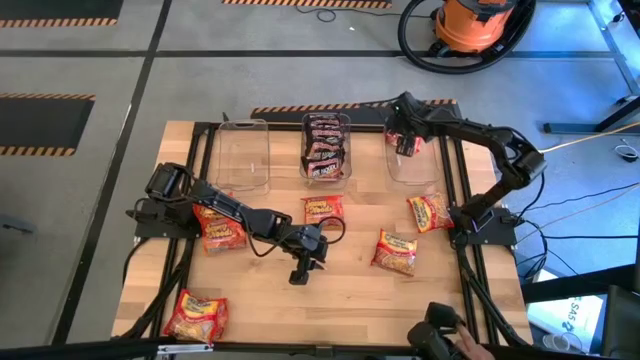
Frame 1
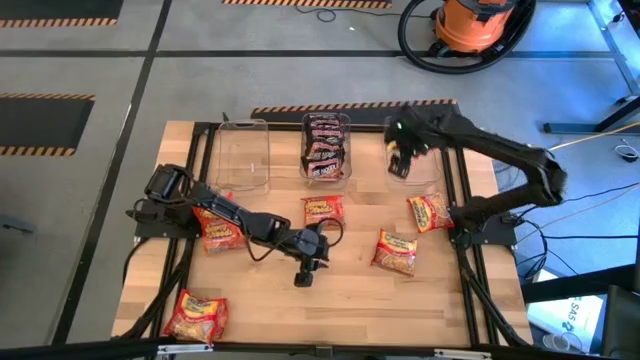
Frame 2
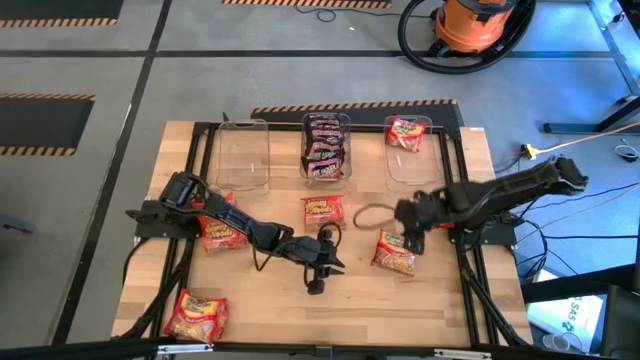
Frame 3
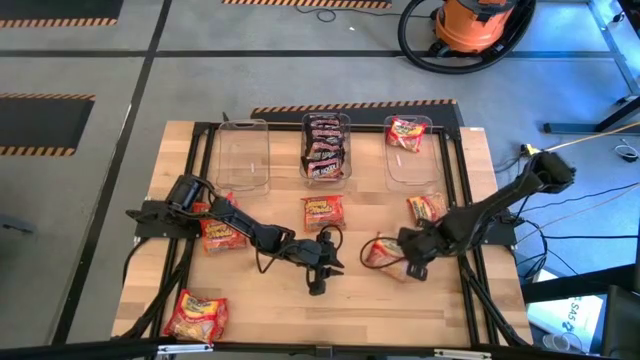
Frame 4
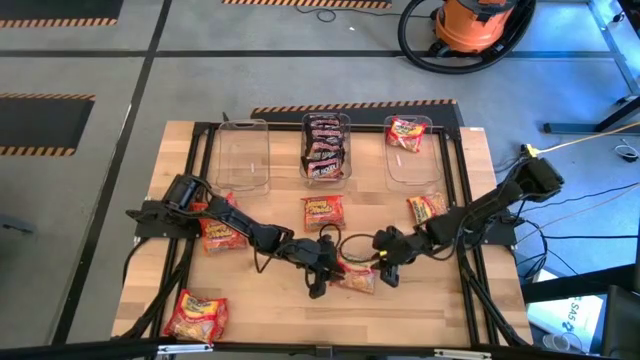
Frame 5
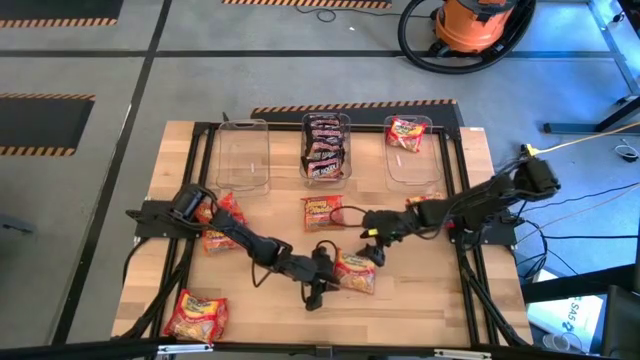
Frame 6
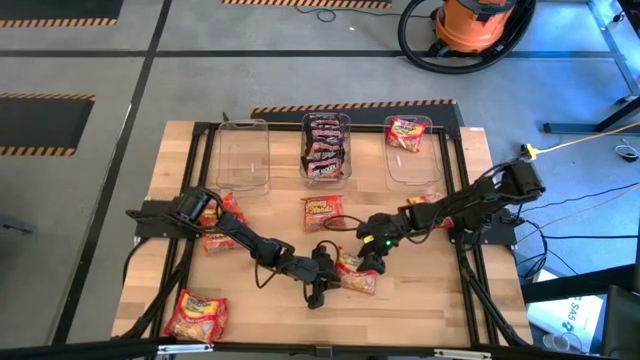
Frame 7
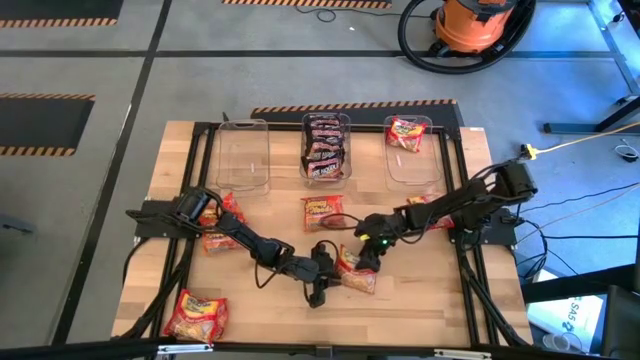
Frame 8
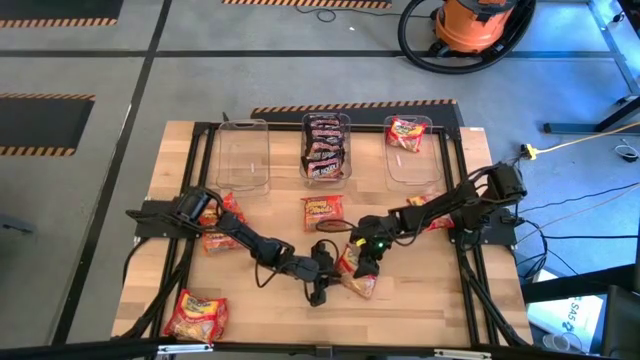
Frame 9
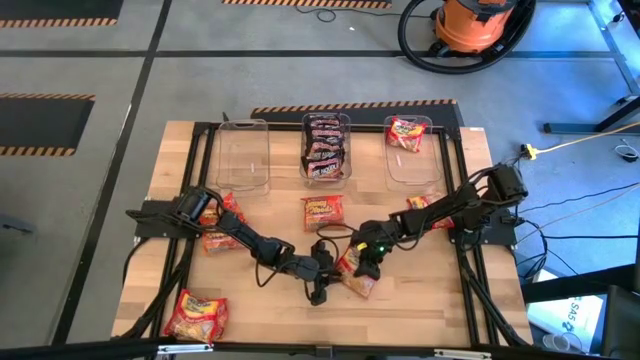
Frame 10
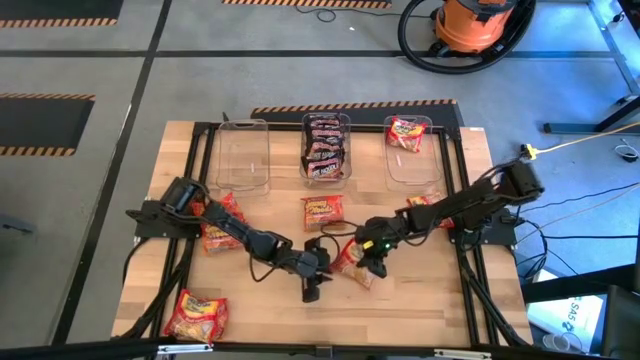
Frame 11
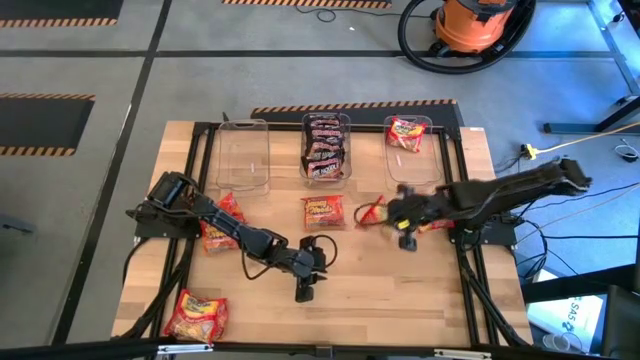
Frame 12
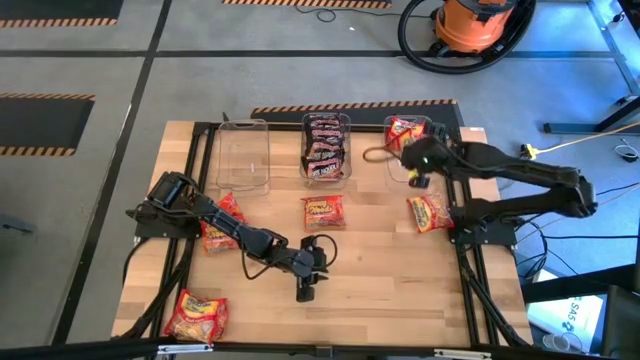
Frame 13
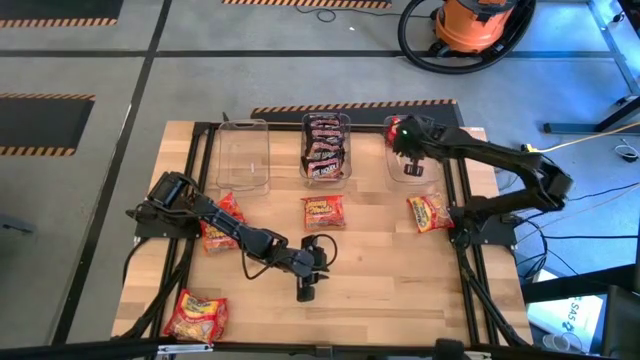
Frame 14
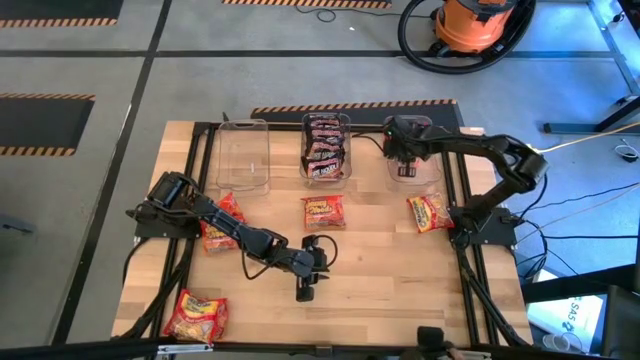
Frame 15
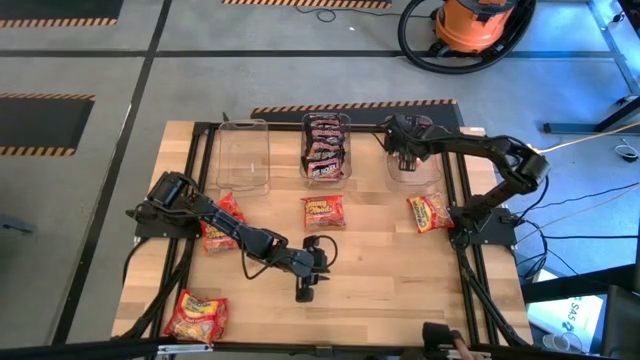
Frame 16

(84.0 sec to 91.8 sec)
Task: Sort Maruchan noodles
Put the middle red noodle pack into the right transparent bin

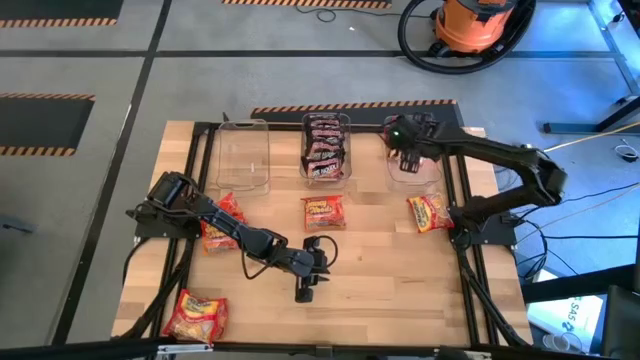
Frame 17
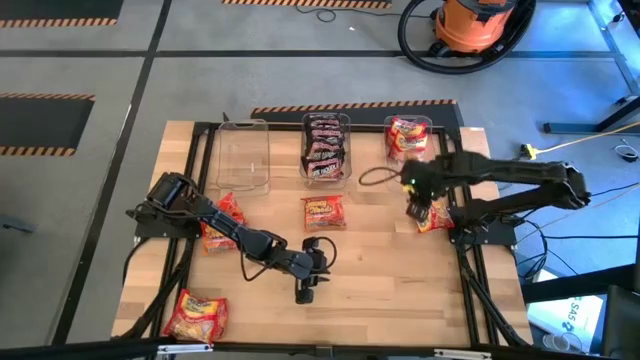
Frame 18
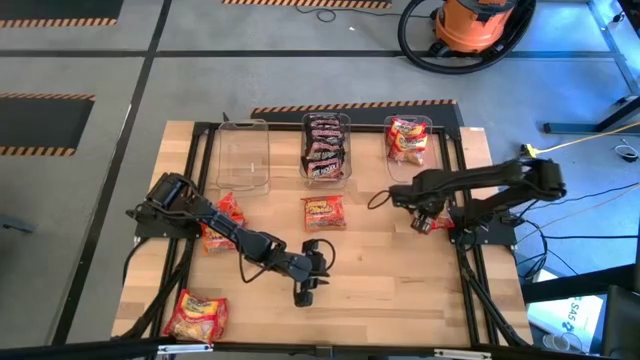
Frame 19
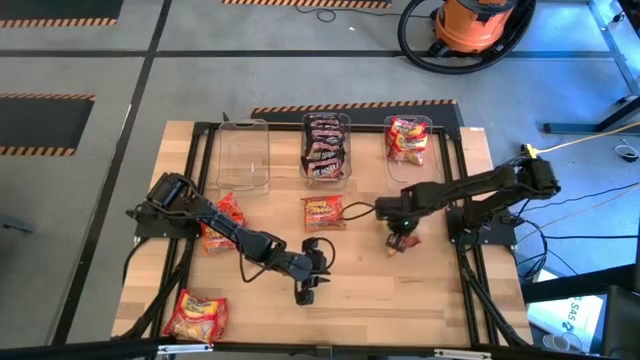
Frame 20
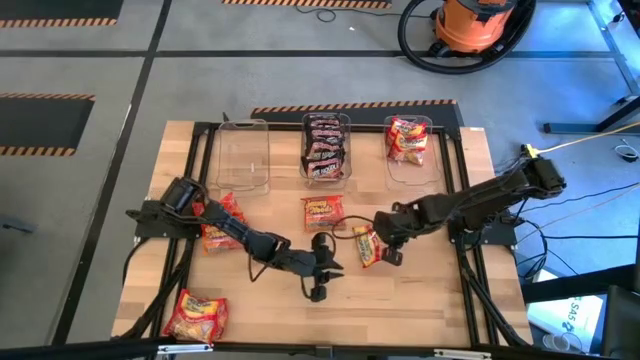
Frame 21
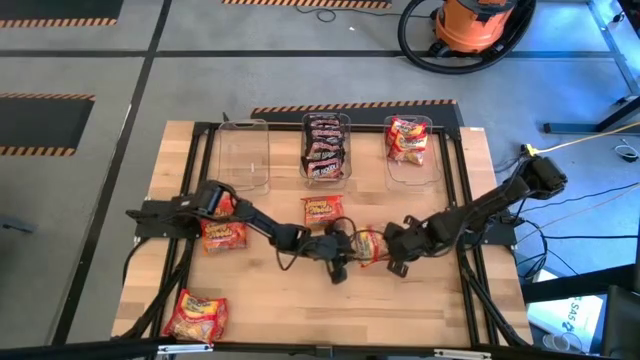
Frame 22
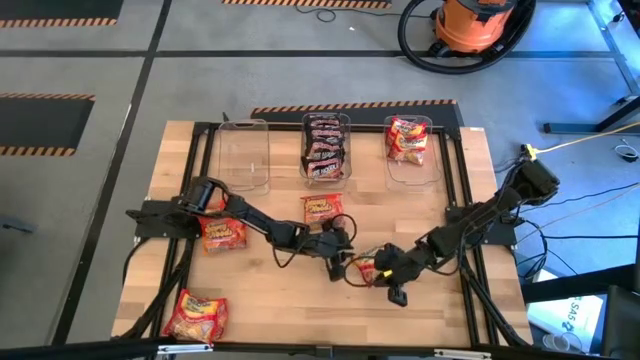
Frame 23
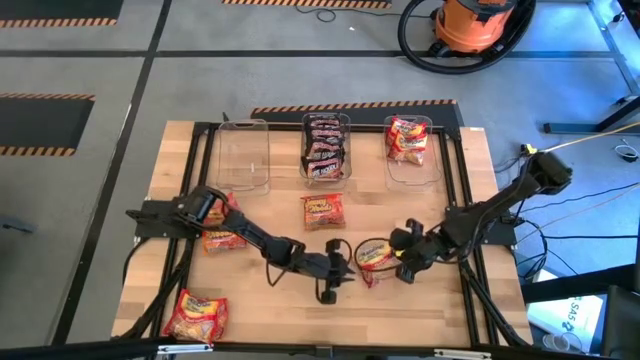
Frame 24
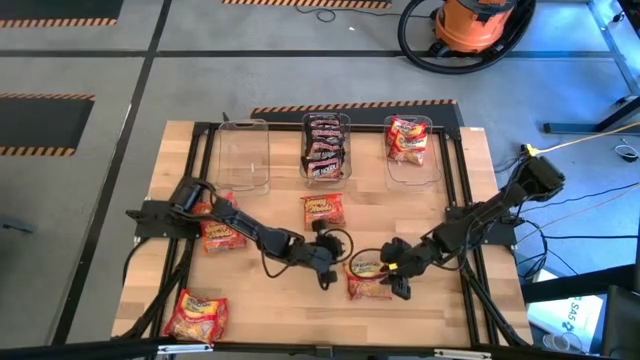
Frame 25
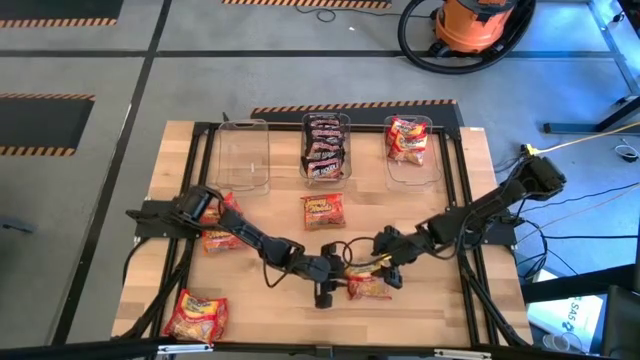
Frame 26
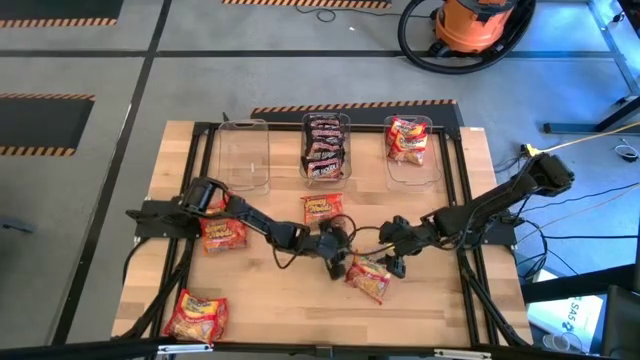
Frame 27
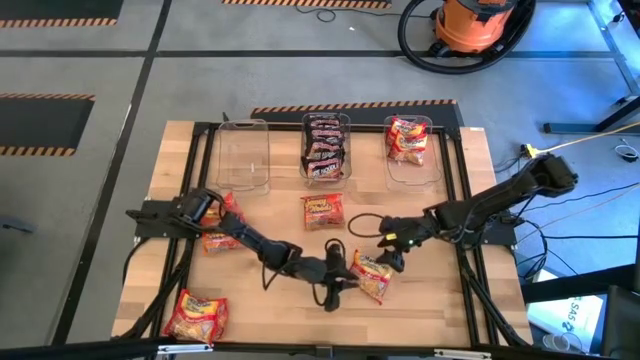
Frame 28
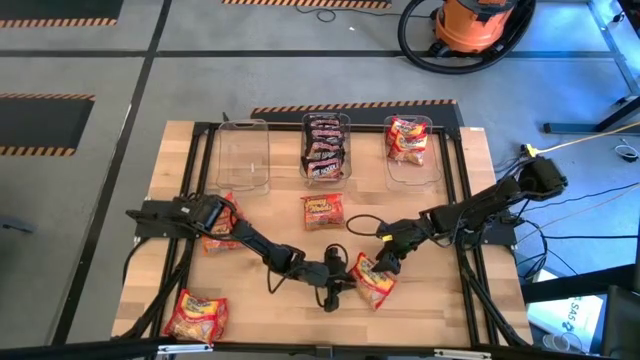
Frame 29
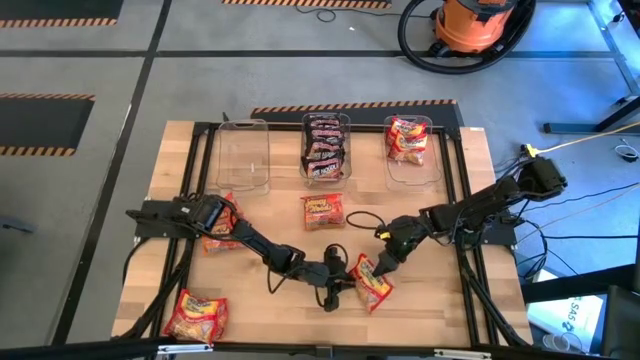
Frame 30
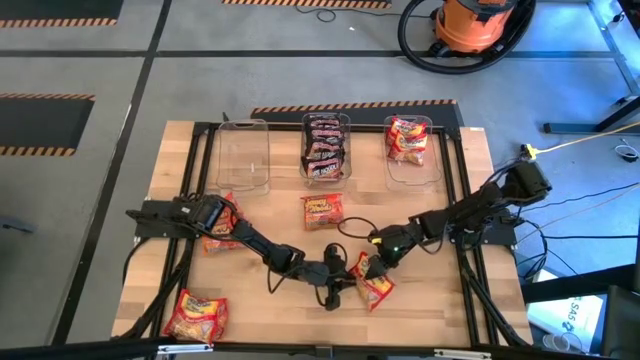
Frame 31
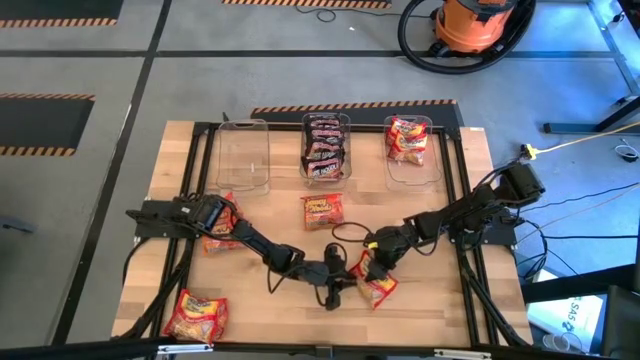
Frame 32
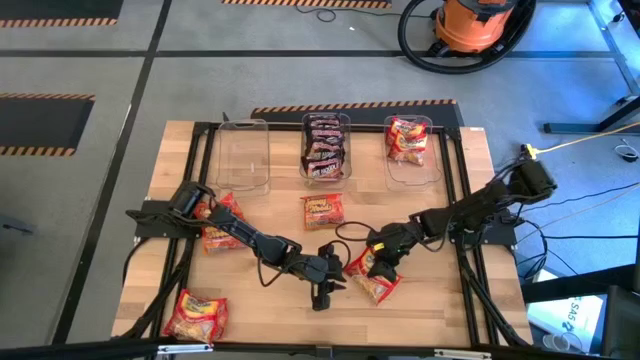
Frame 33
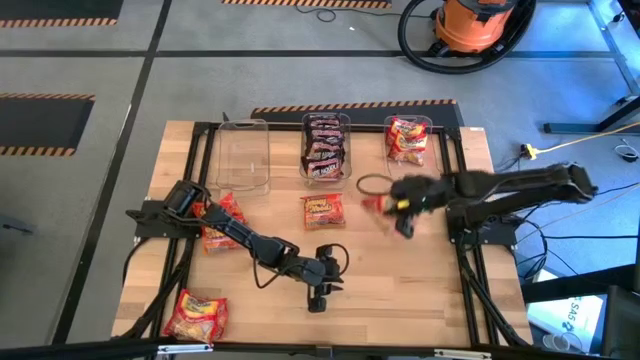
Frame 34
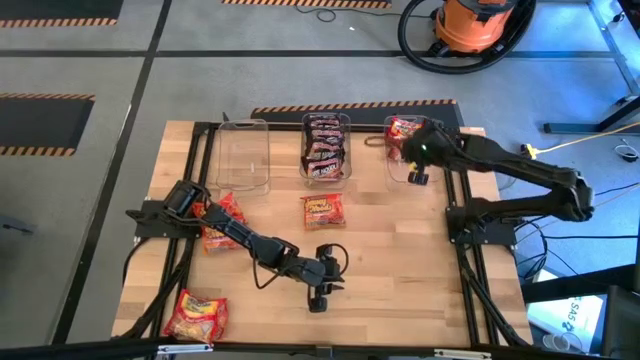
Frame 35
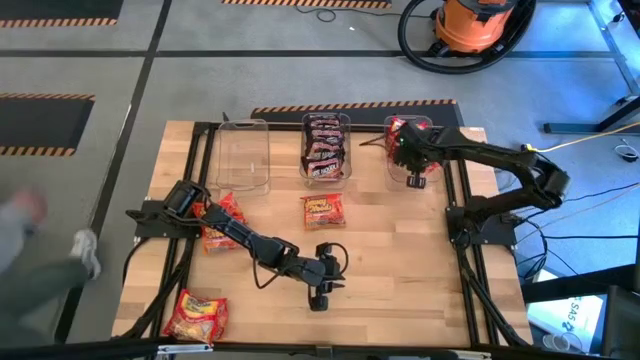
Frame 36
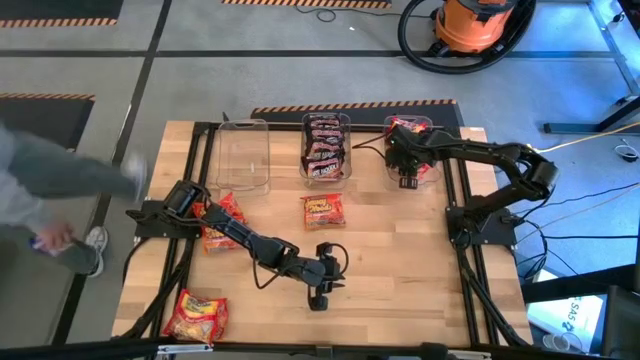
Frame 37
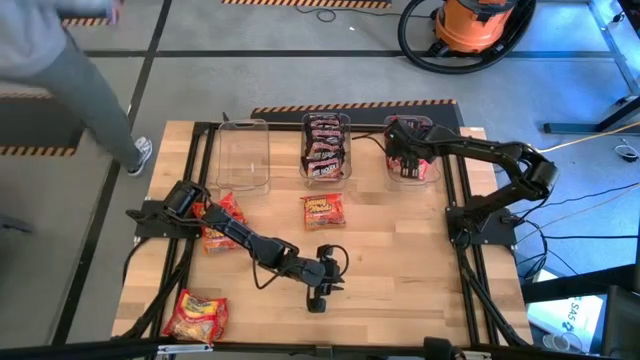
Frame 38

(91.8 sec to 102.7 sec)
Put the top red noodle pack into the right transparent bin

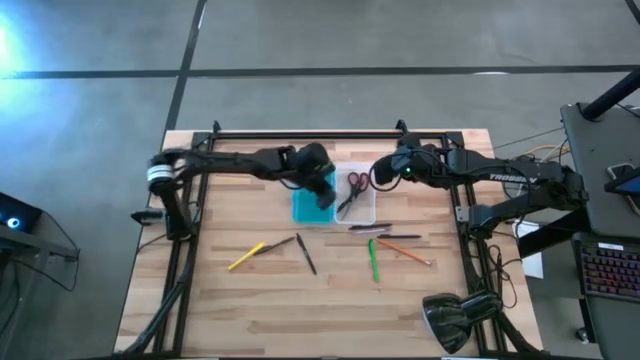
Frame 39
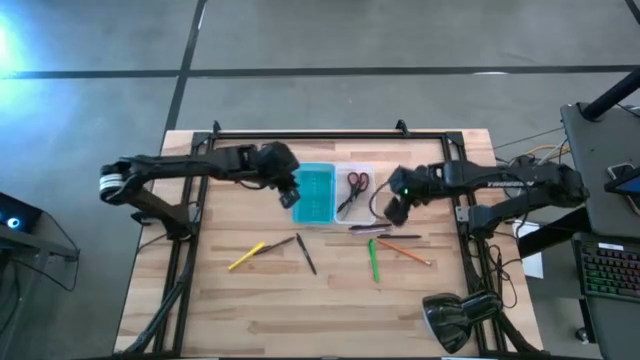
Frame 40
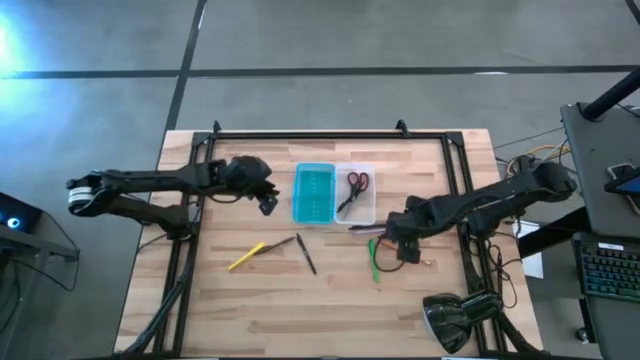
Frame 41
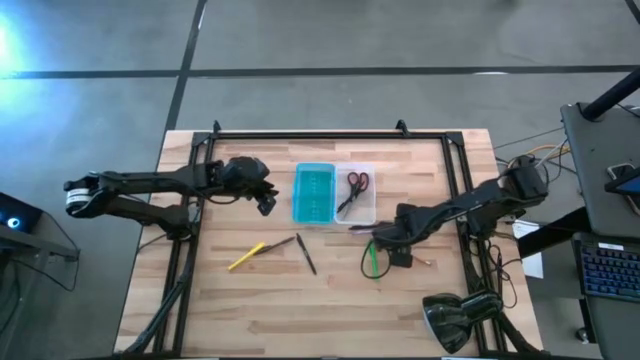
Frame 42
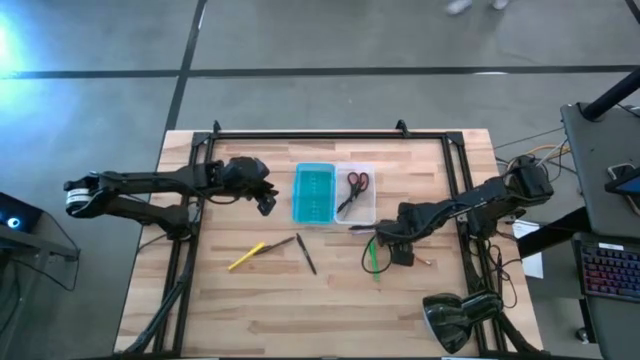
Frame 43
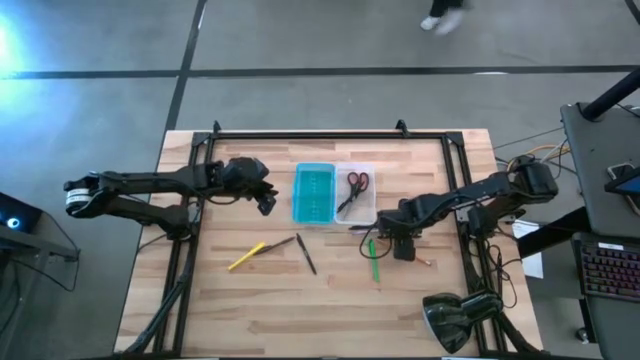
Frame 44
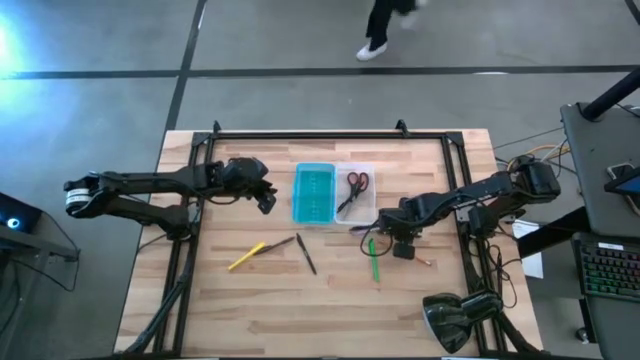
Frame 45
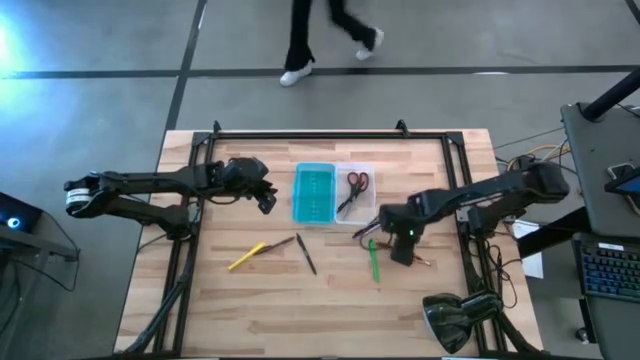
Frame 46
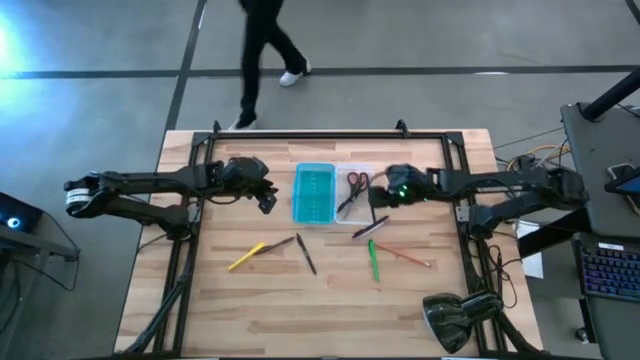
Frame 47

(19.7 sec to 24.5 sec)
Task: Pick & place school supplies into a supply box
Put the black pen into the supply box
